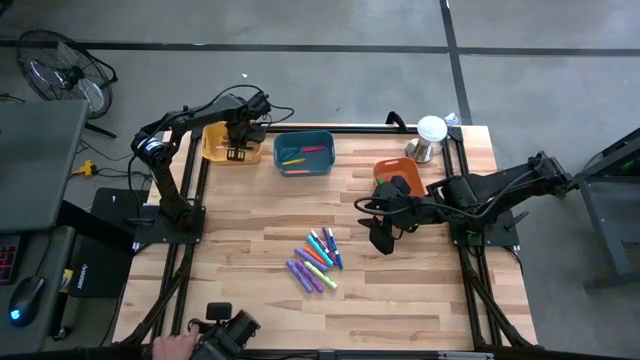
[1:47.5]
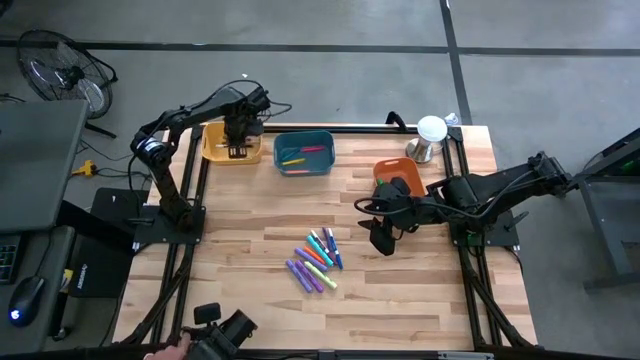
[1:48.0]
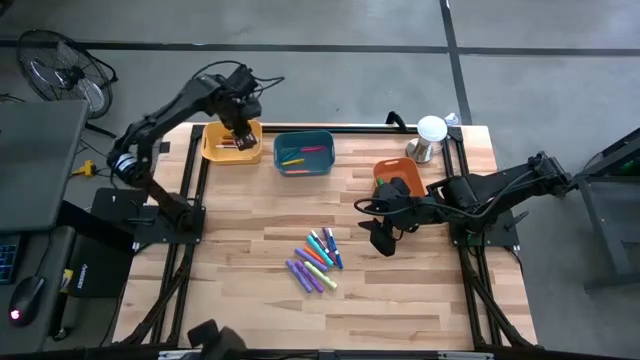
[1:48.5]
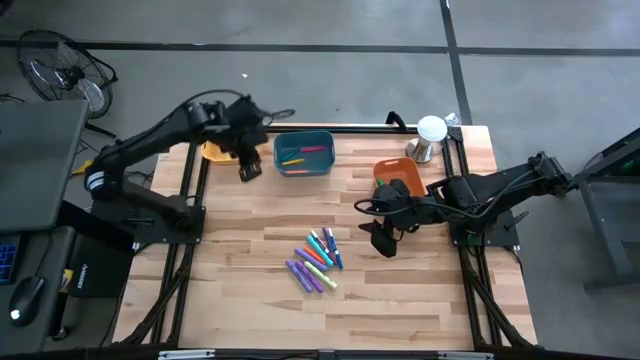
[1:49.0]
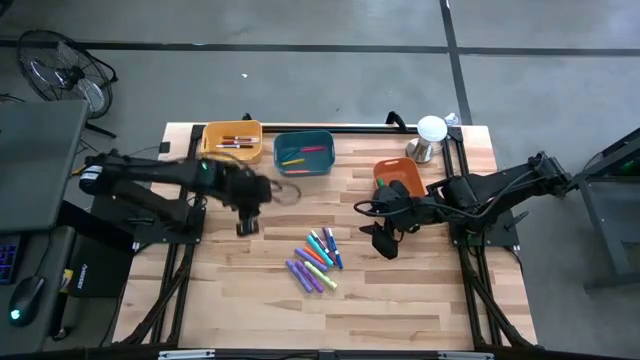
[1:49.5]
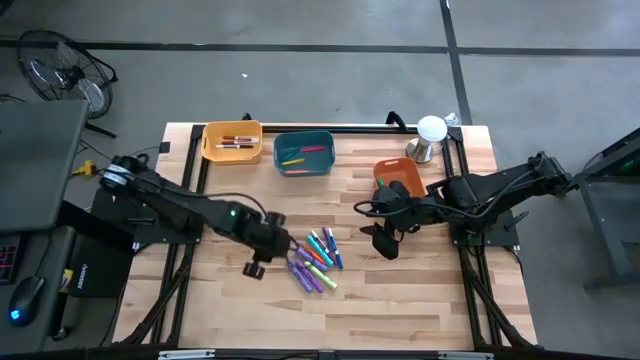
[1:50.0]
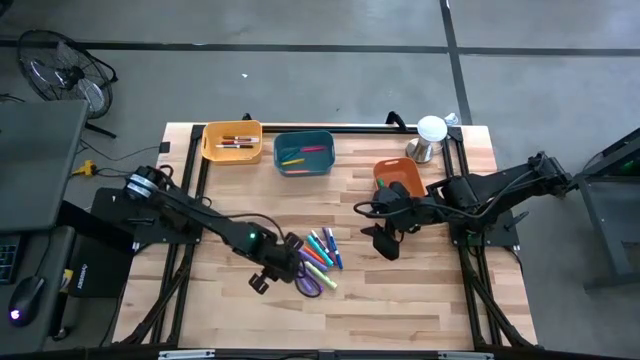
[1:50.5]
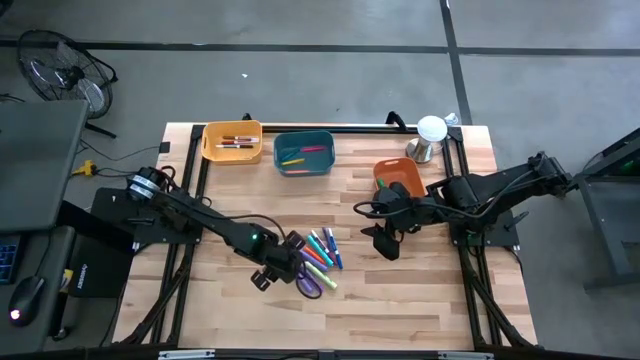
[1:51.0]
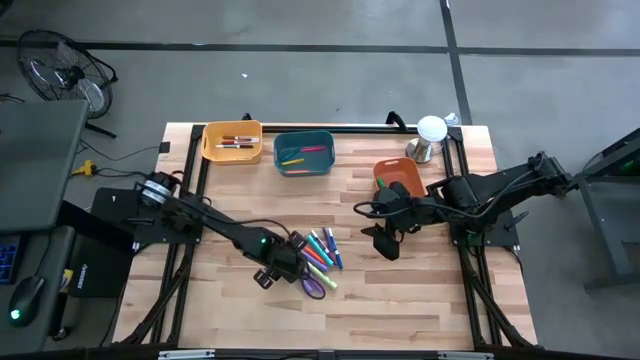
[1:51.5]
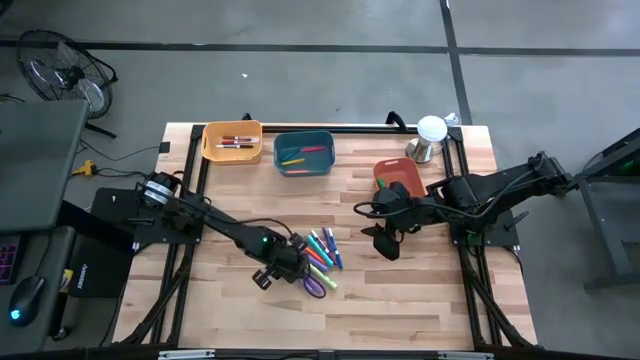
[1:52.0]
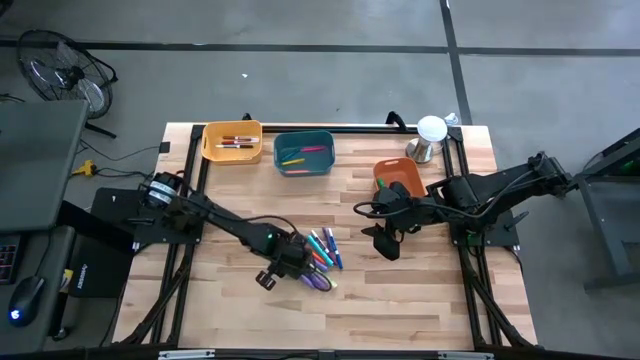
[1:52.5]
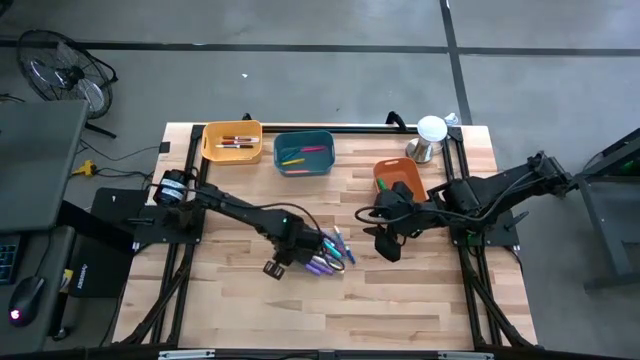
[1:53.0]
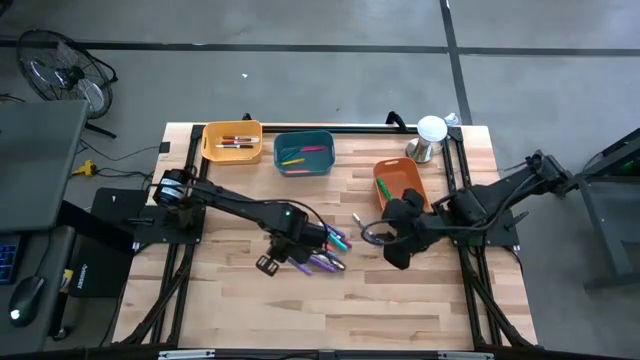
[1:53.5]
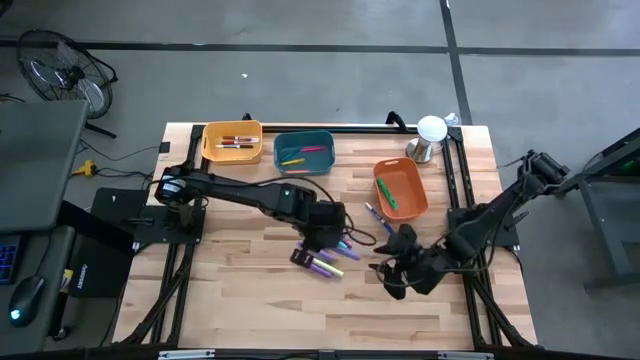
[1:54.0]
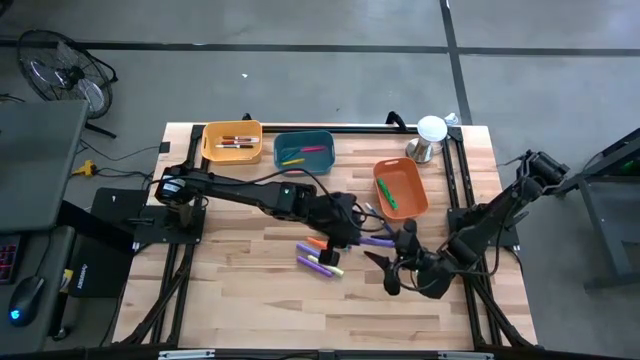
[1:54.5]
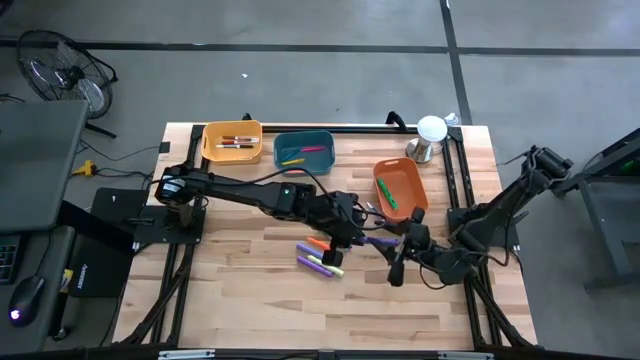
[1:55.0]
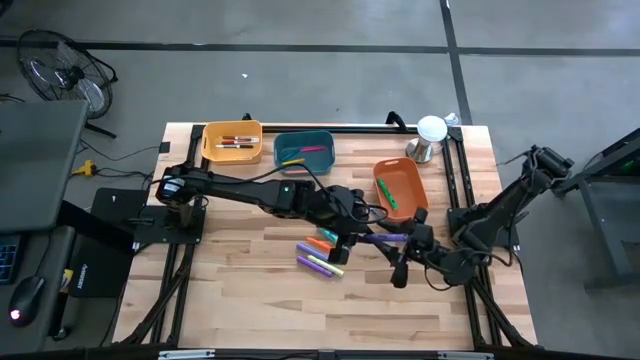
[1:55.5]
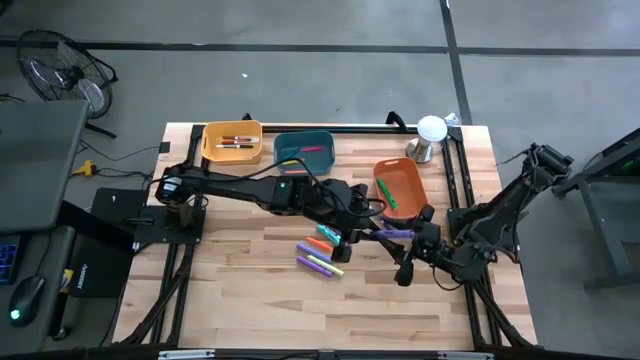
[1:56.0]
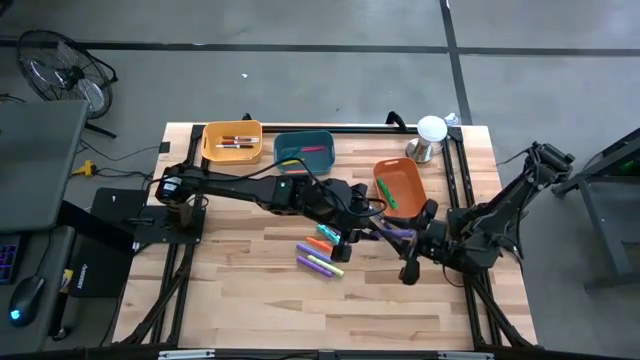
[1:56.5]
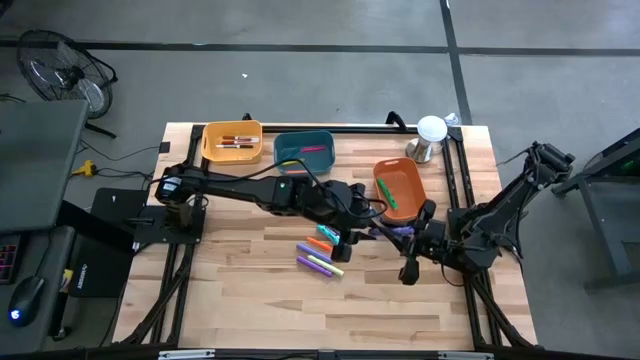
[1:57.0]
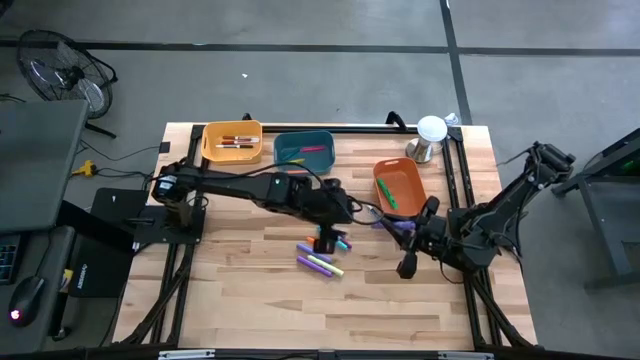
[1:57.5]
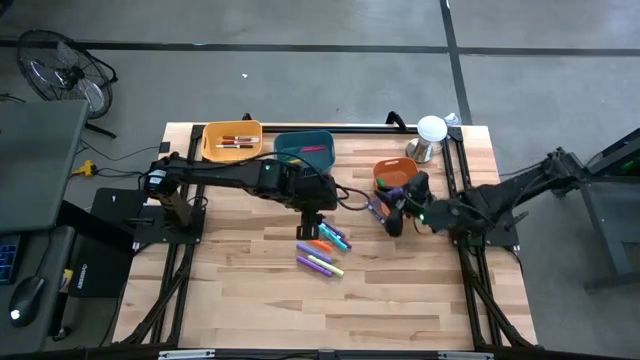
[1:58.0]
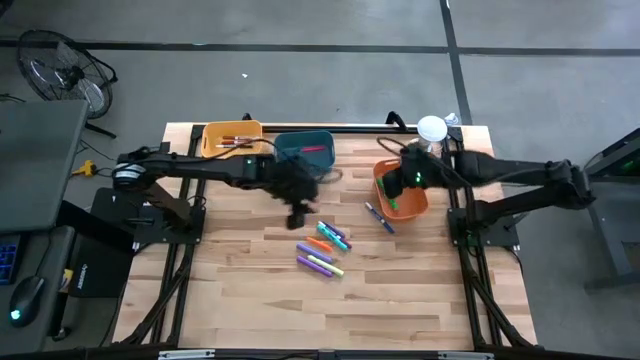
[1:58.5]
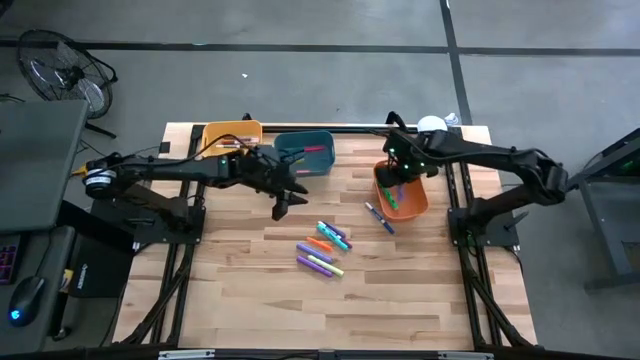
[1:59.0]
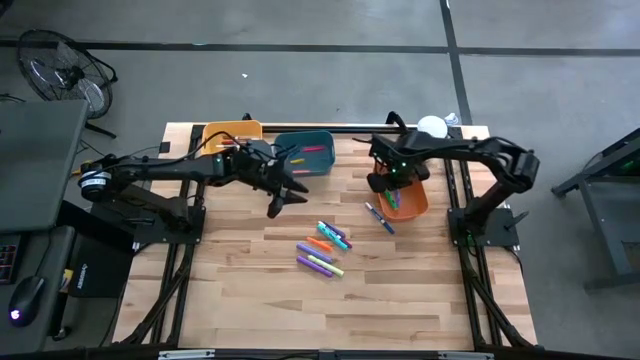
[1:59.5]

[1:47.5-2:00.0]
Task: Pick & Place Markers
Put the bottom light purple highlighter pen into the orange bin

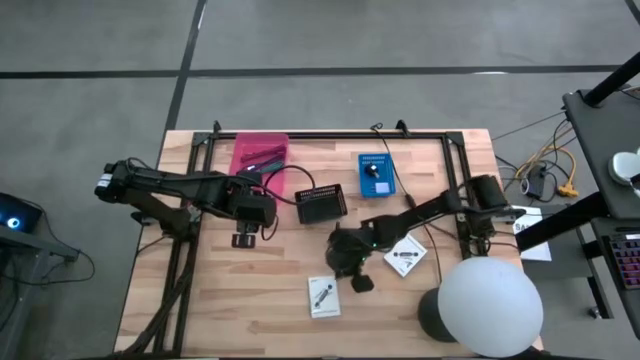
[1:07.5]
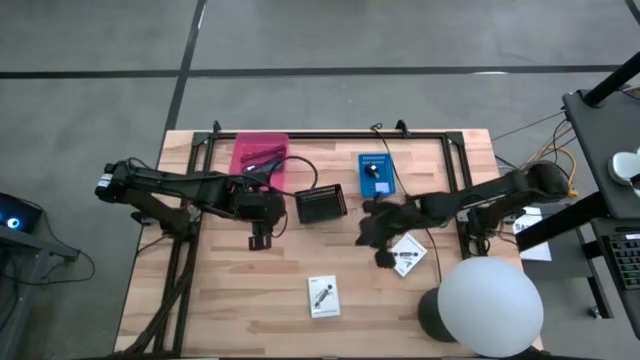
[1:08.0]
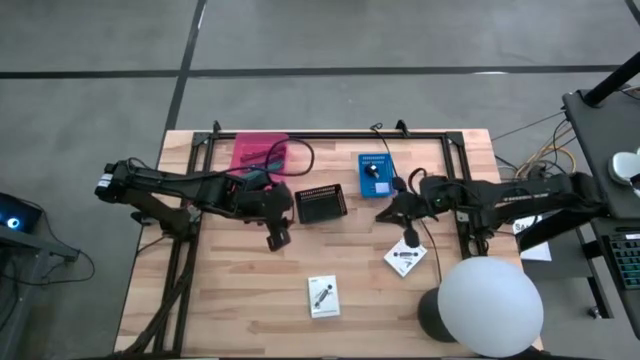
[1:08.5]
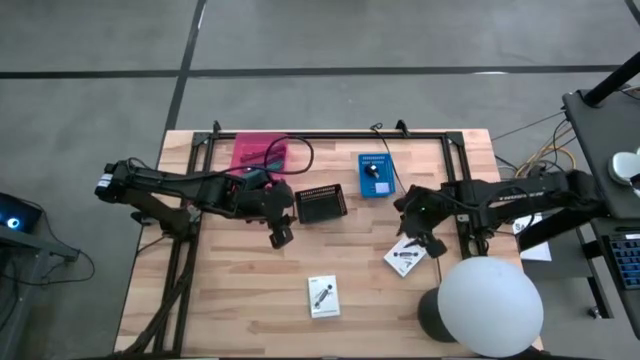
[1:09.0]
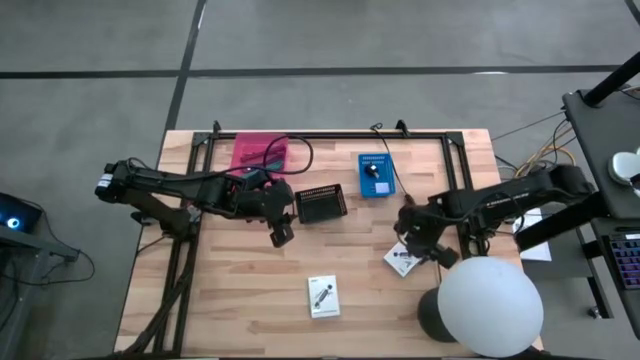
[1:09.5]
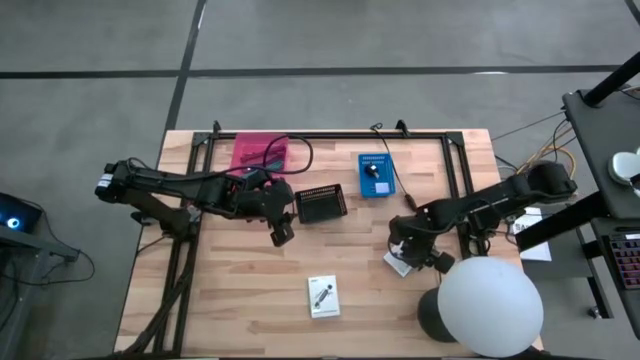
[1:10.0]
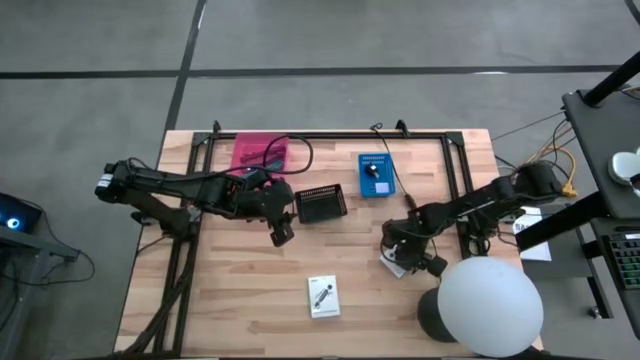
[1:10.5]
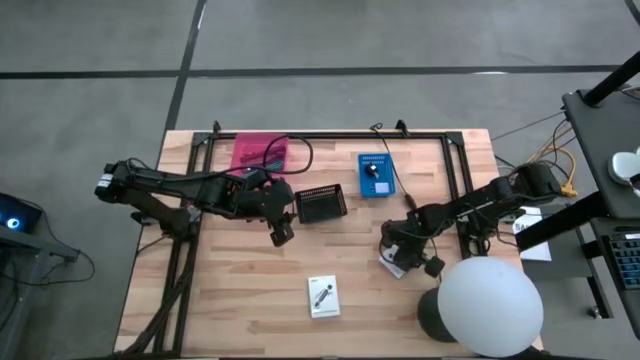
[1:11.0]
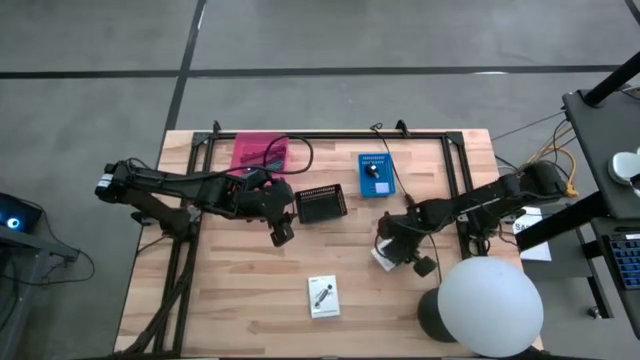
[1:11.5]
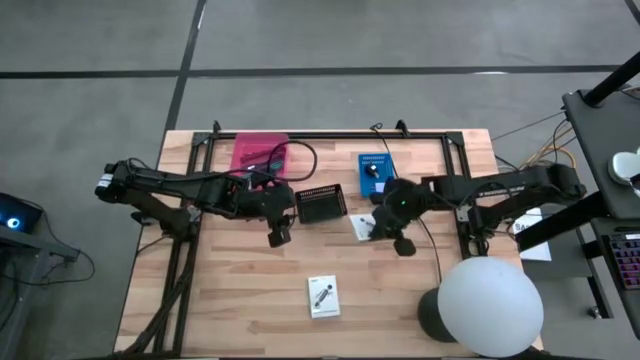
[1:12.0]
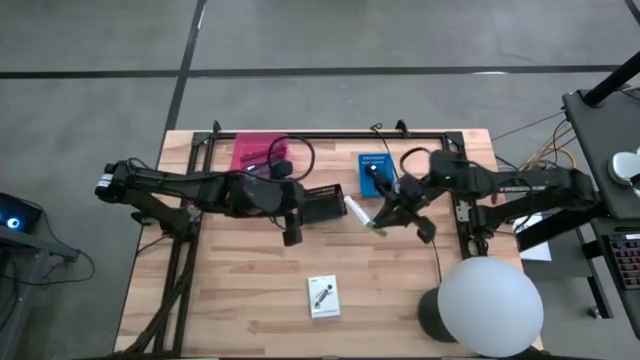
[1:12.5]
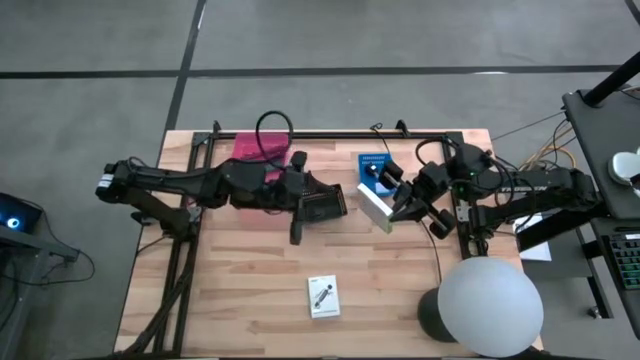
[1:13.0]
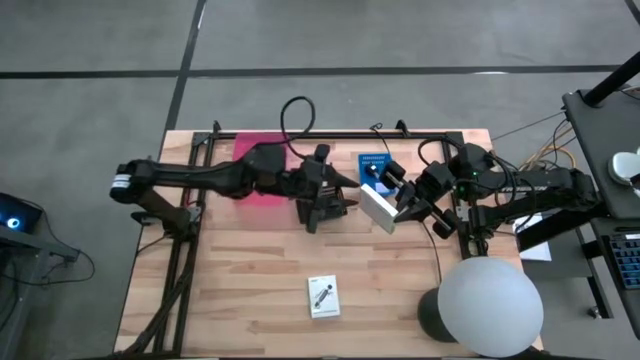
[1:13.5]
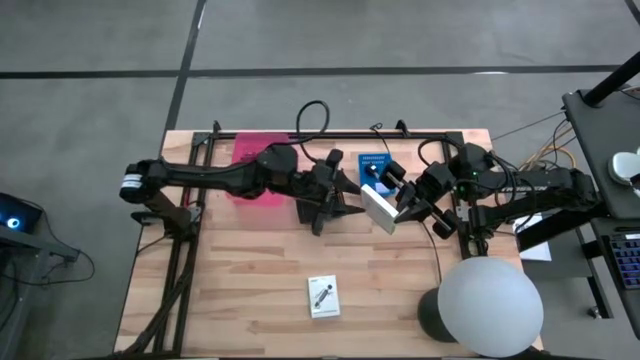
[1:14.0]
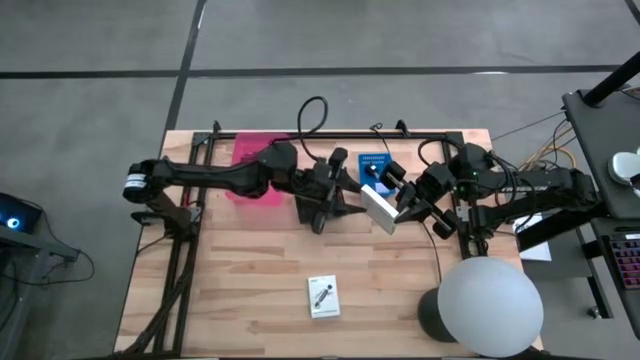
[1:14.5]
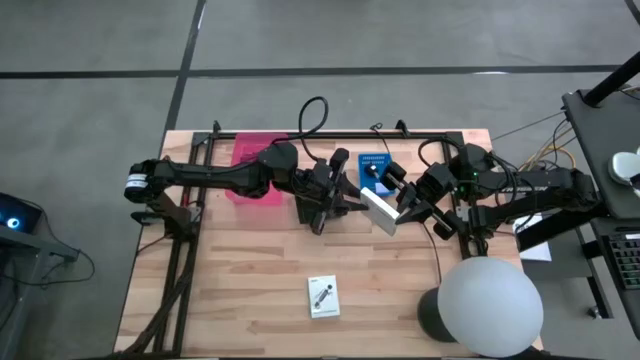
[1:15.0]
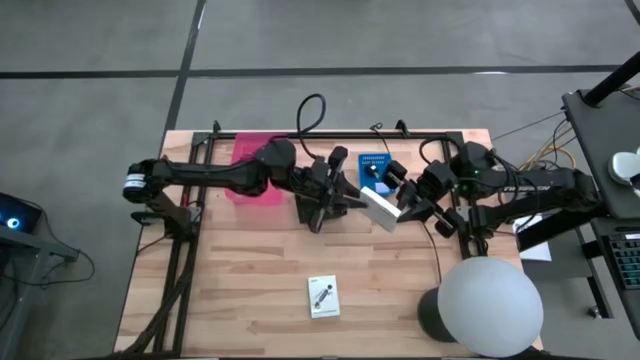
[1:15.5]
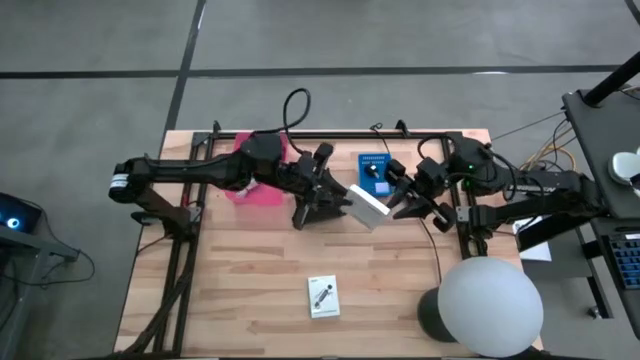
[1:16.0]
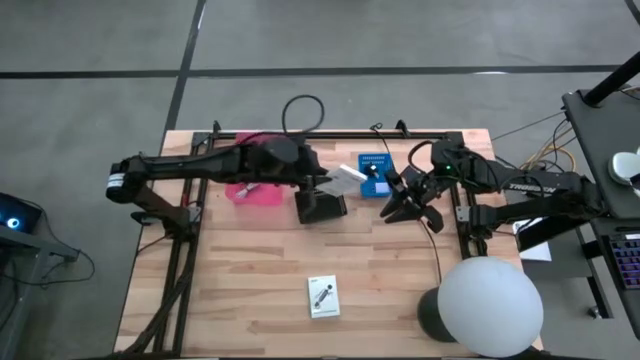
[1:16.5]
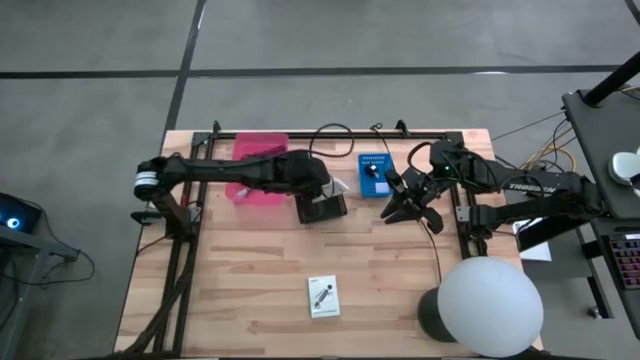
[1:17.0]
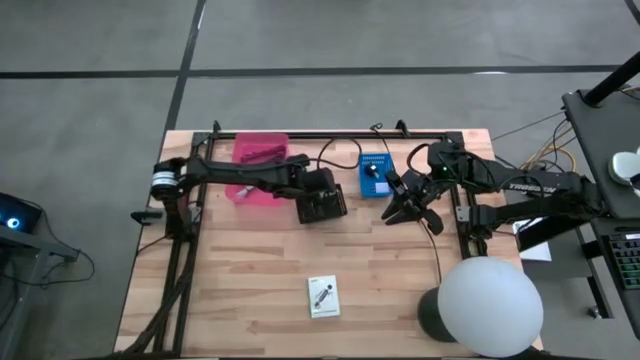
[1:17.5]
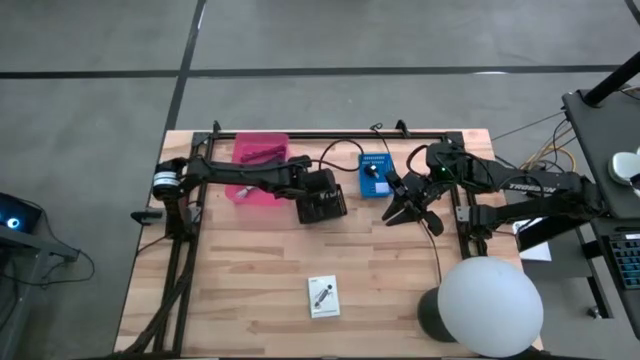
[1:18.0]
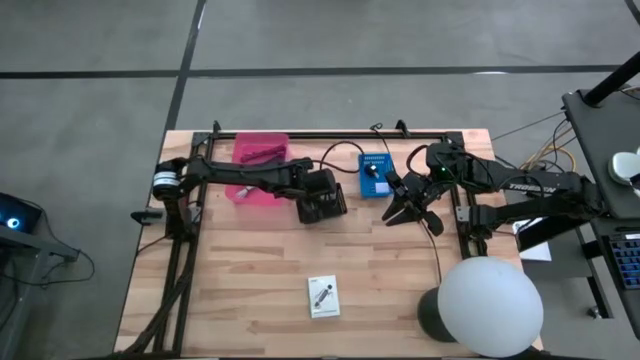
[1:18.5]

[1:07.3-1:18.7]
Task: Pick and place items into bin
Put the right white card reader box into the black bin
